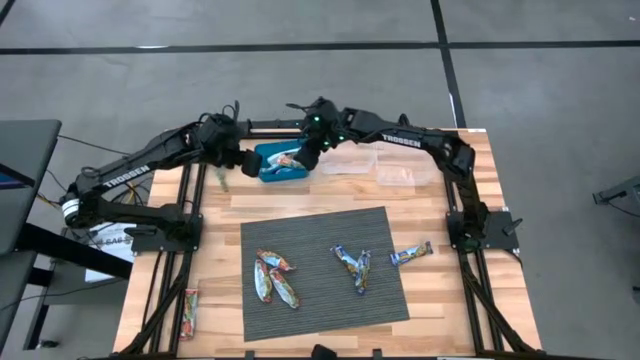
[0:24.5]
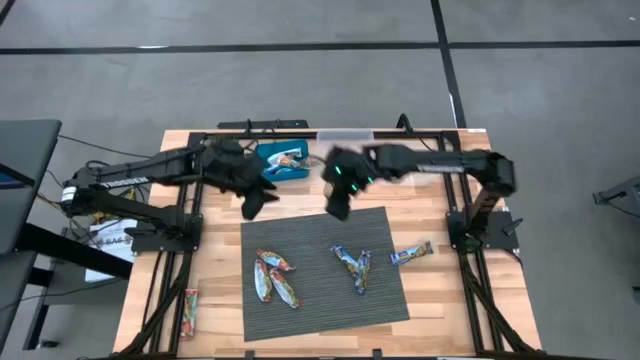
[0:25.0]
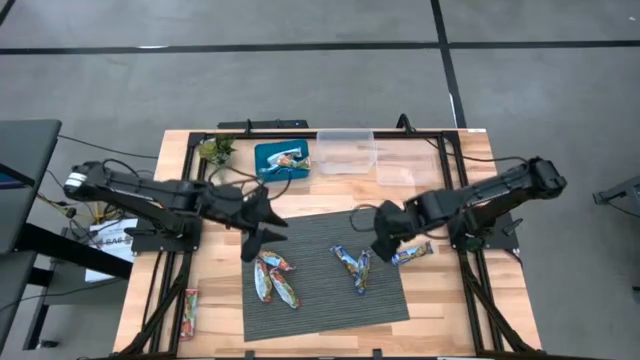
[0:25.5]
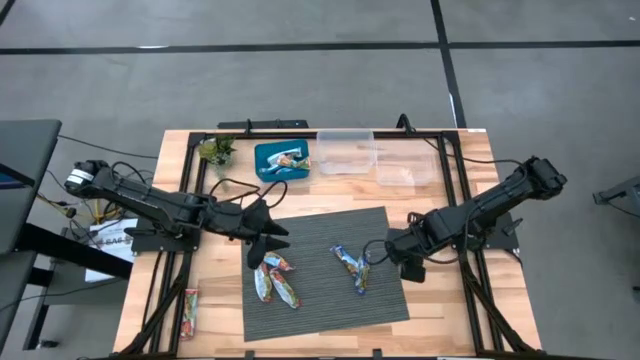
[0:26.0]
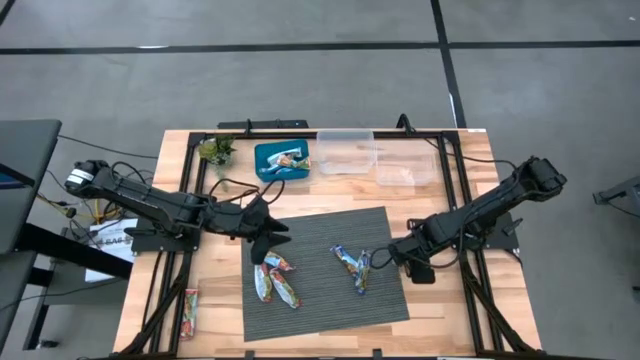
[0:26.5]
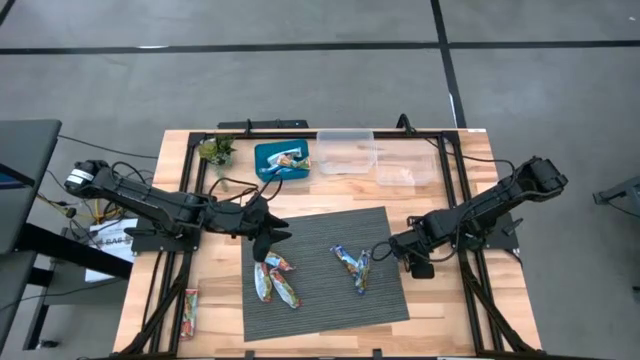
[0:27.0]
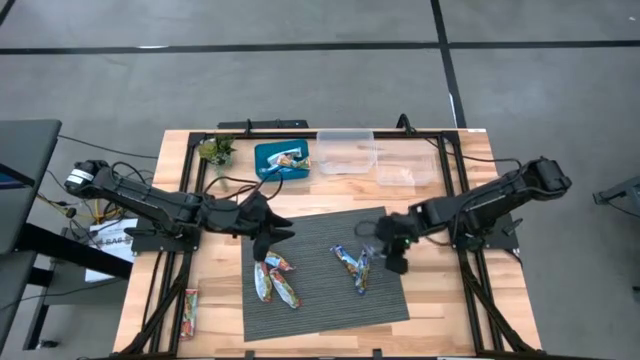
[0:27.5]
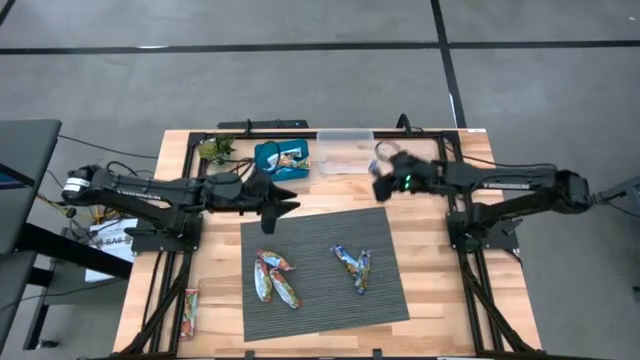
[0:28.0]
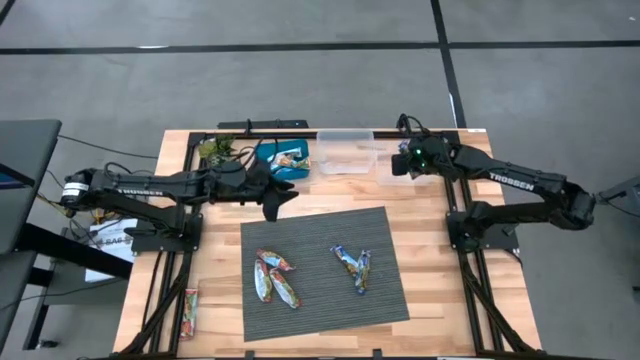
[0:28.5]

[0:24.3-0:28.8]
Task: Pick and place Granola Bars by type
Put the blue granola bar into the right transparent bin

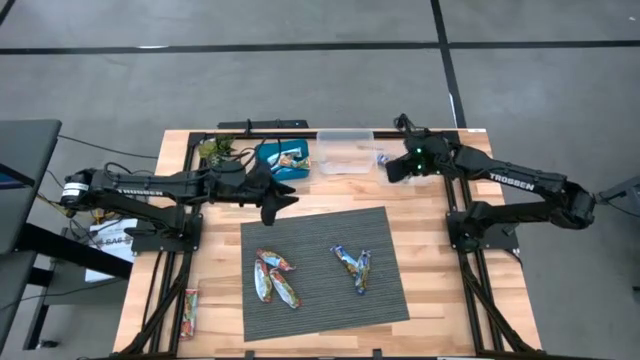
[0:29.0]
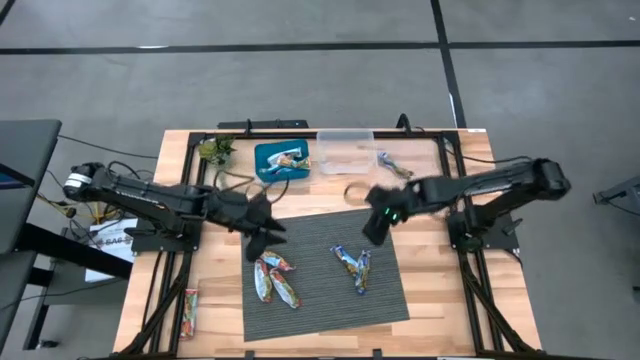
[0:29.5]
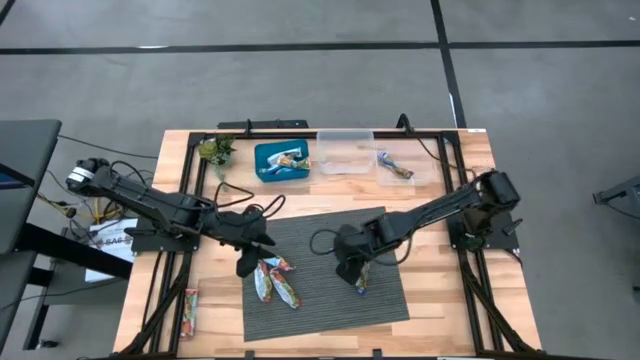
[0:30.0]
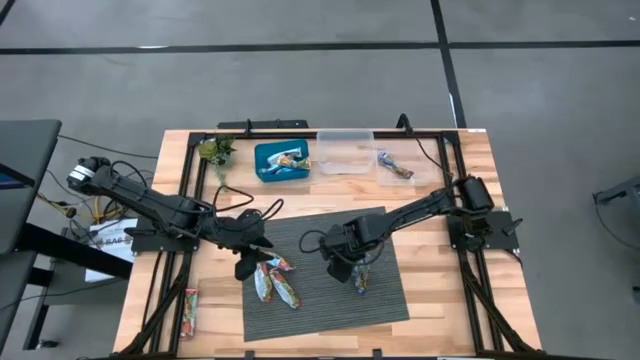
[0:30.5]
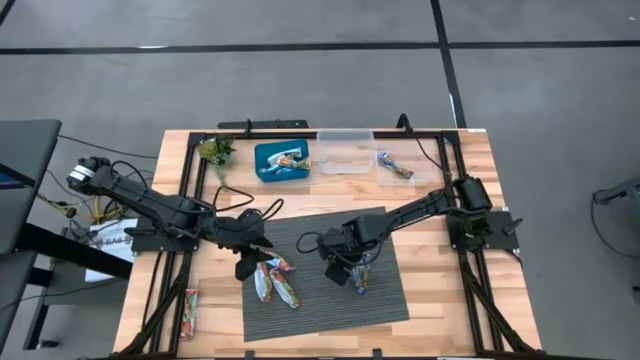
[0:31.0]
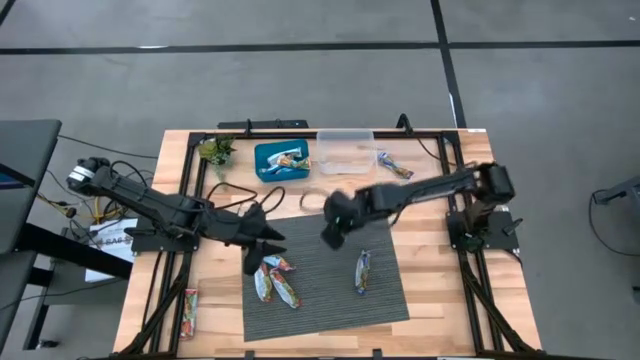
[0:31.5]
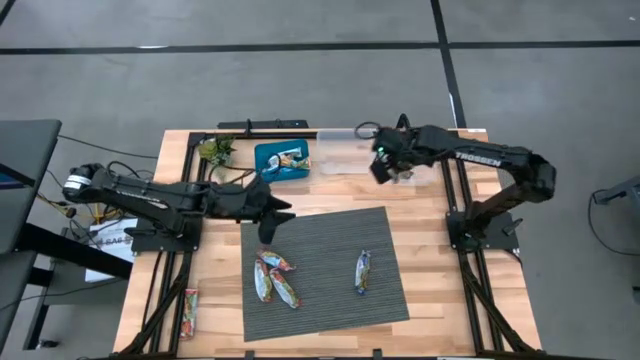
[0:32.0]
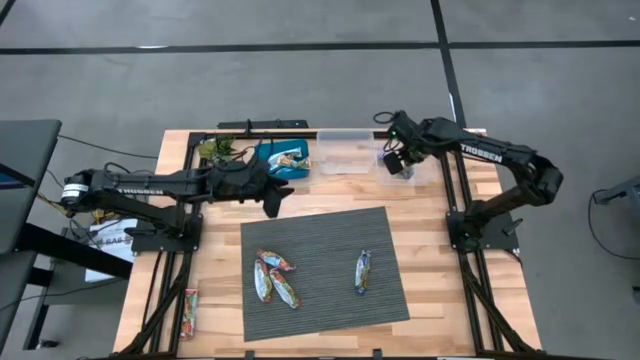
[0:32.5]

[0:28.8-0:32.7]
Put the blue granola bar into the right transparent bin

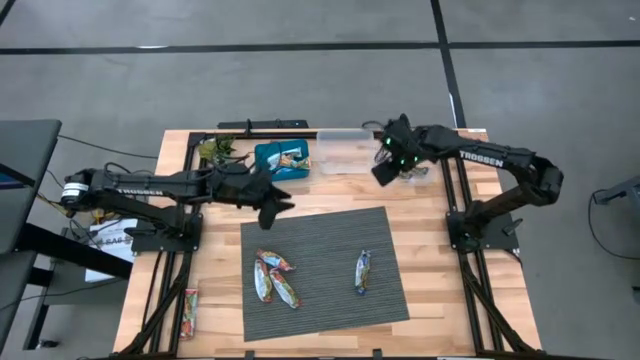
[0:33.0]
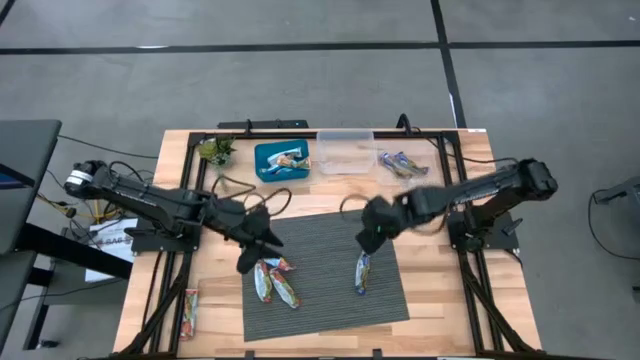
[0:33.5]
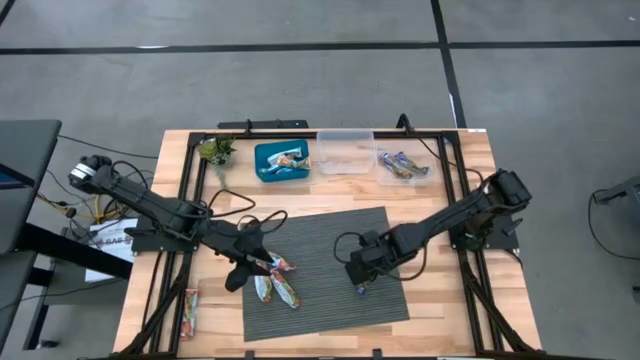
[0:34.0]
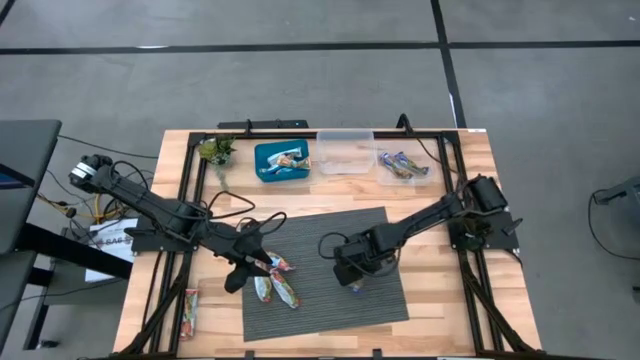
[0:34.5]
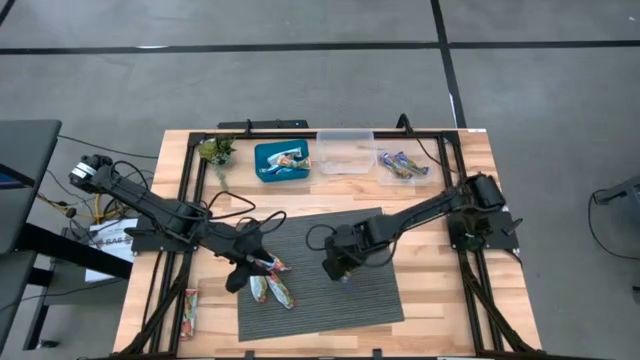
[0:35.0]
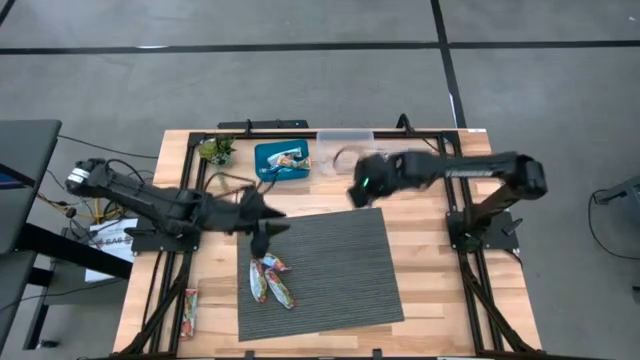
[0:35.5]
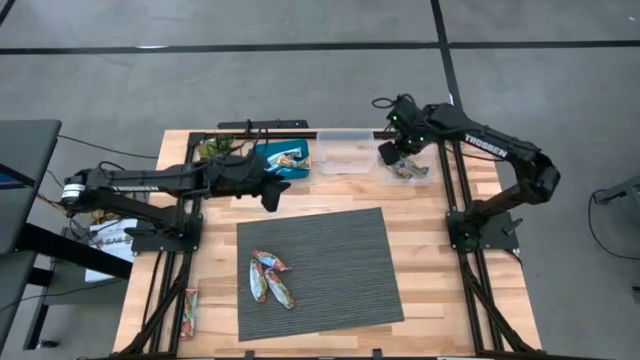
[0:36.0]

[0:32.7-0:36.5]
Put the blue granola bar into the right transparent bin

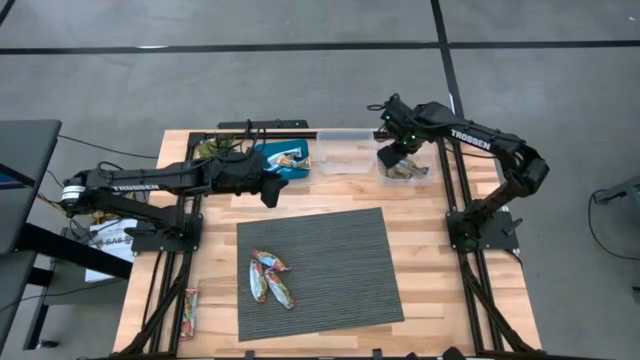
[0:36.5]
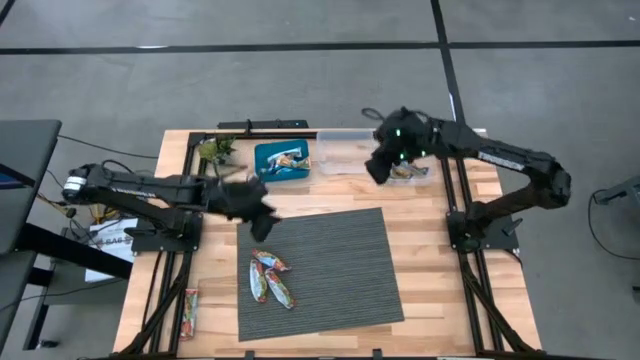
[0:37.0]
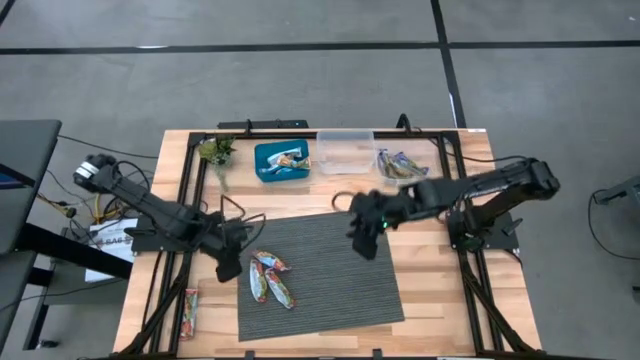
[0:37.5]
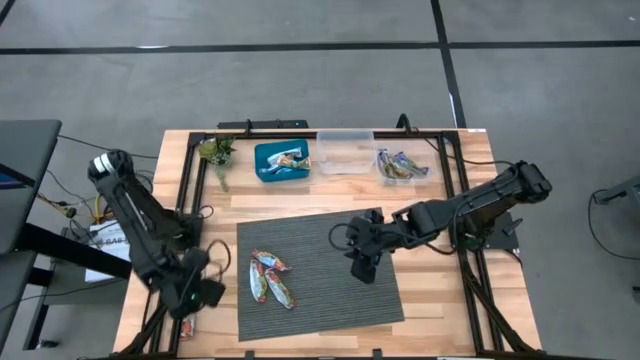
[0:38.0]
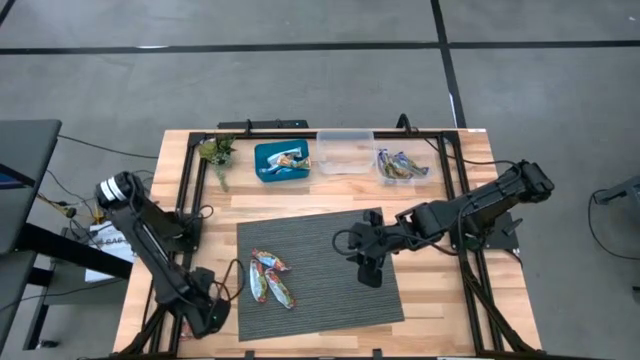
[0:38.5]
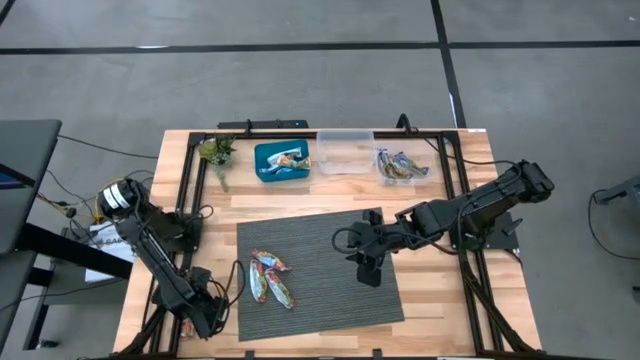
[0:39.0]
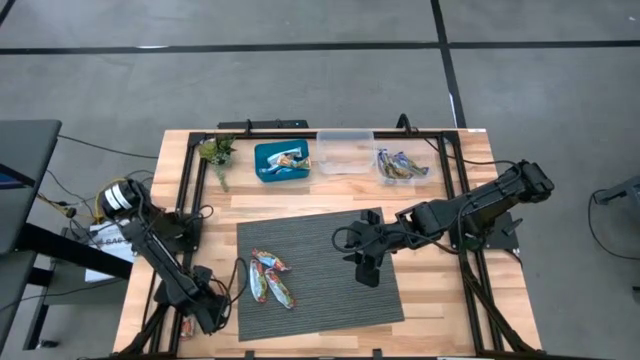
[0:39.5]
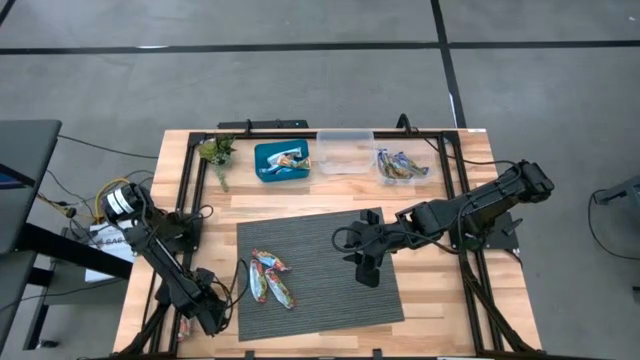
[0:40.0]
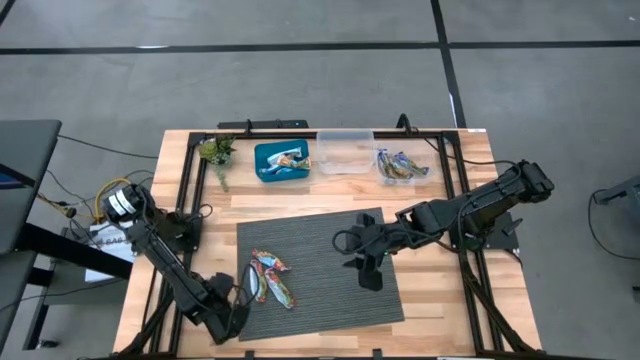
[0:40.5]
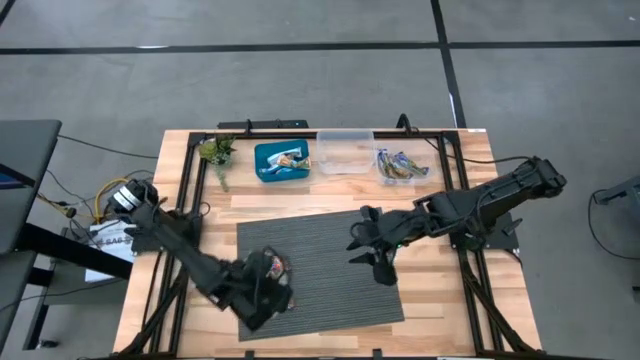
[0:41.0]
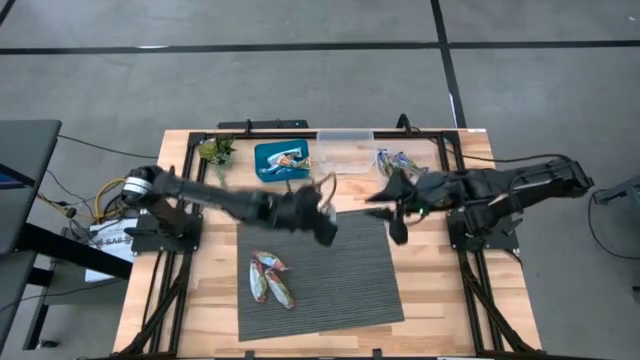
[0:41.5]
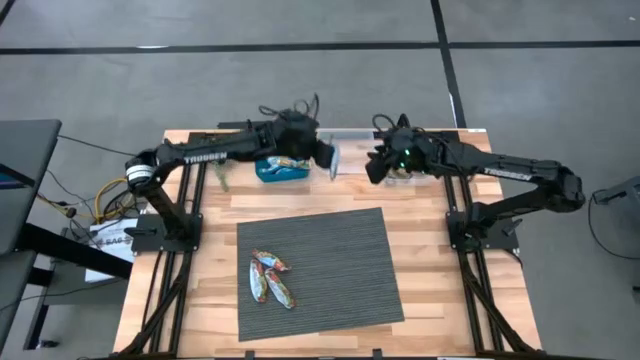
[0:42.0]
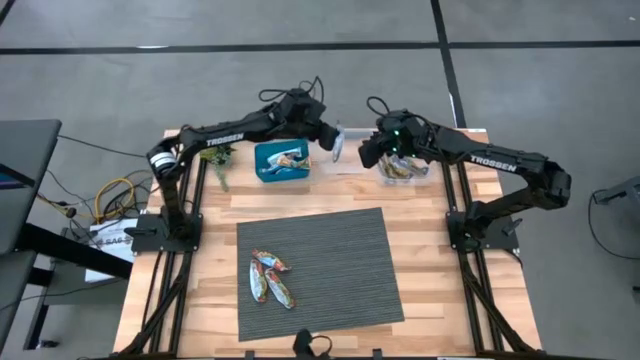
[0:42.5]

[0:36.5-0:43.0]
Put the red granola bar into the left transparent bin

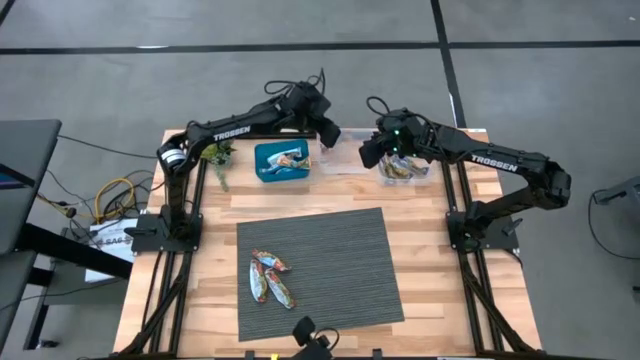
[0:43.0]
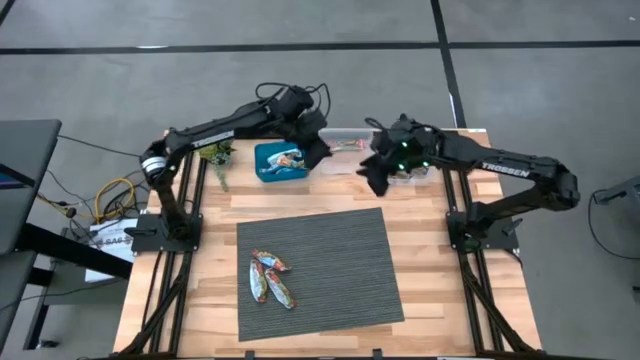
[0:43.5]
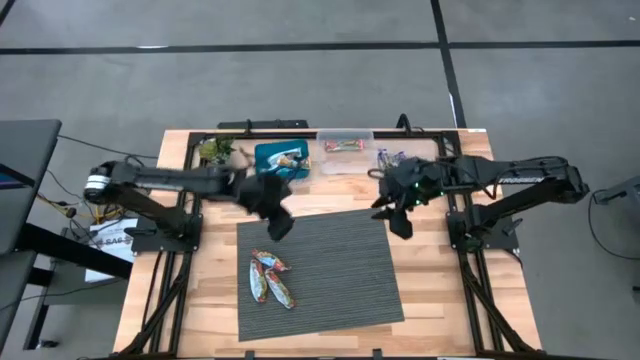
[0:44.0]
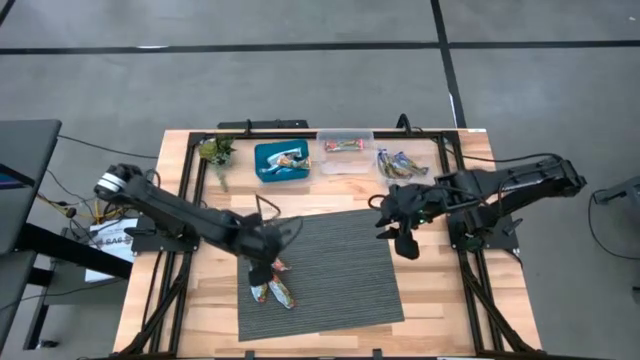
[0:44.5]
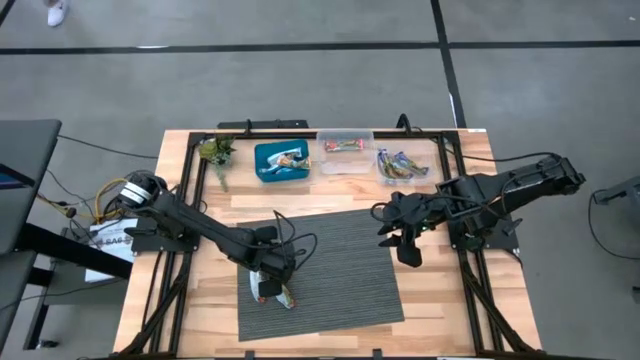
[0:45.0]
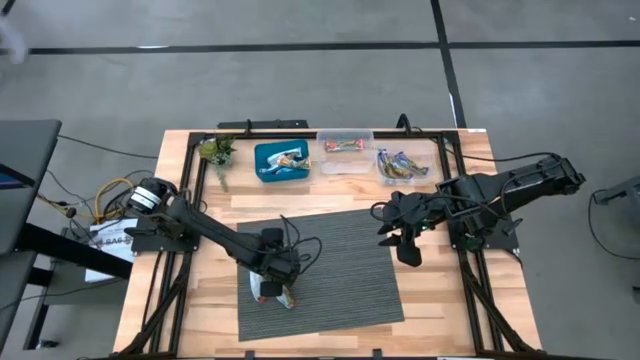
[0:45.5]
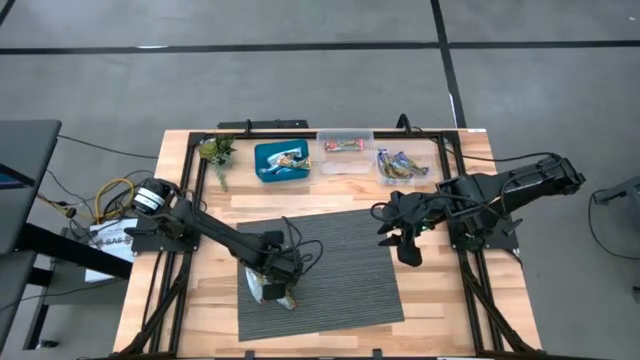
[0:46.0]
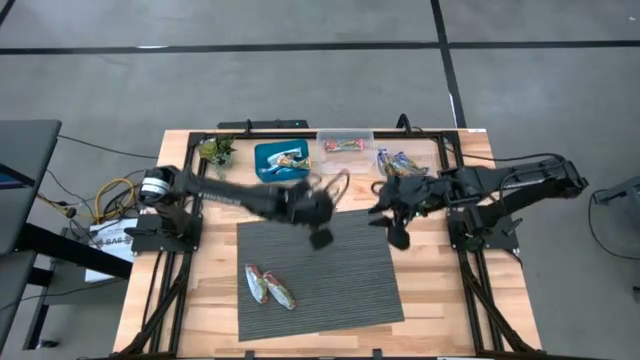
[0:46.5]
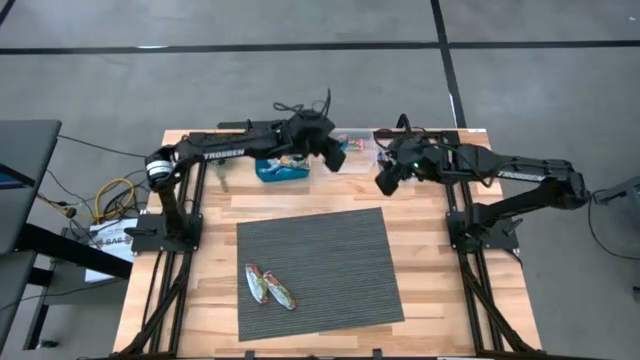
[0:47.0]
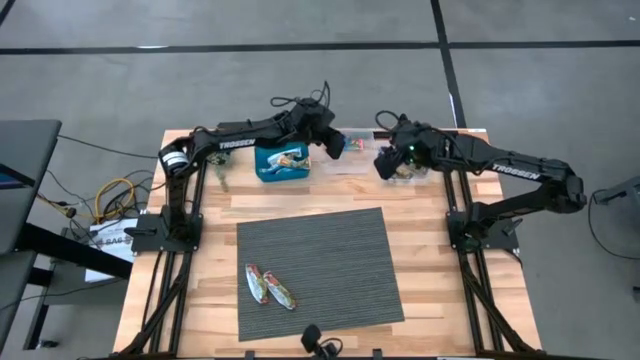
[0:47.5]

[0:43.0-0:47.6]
Put the red granola bar into the left transparent bin
